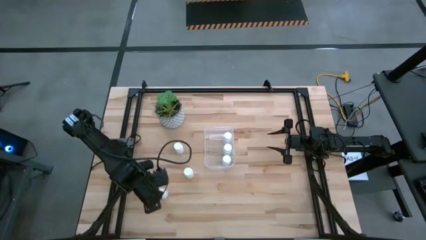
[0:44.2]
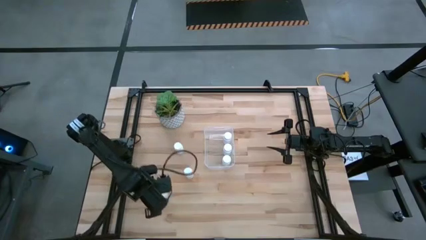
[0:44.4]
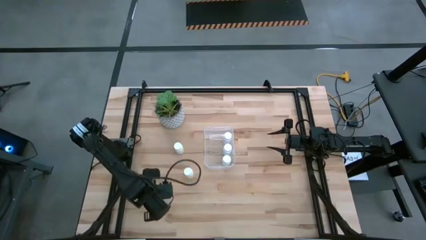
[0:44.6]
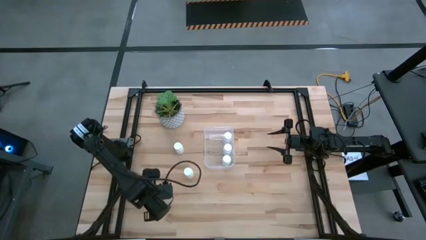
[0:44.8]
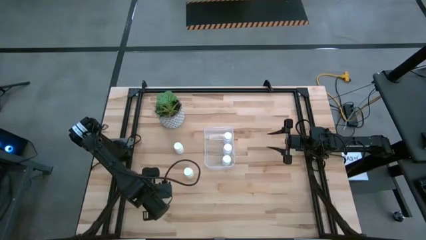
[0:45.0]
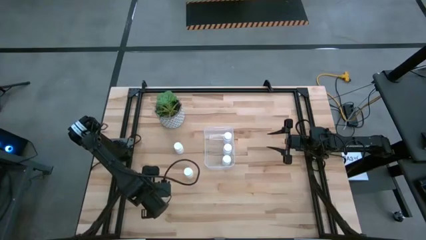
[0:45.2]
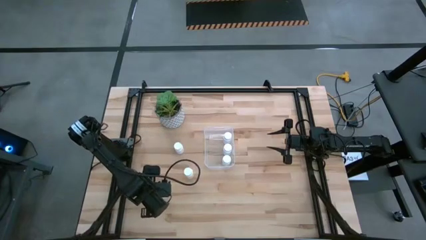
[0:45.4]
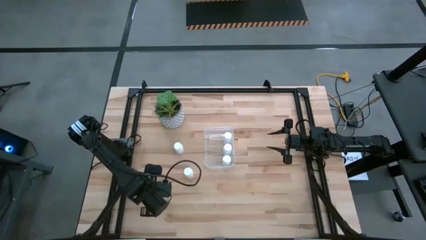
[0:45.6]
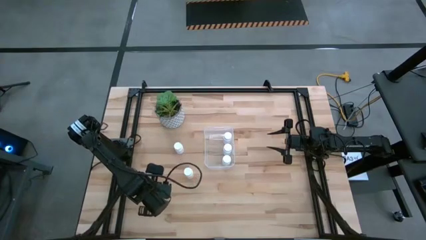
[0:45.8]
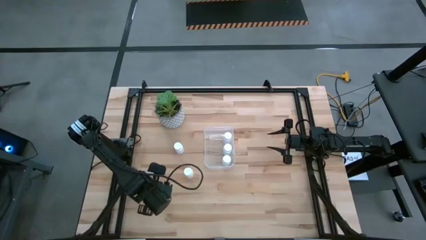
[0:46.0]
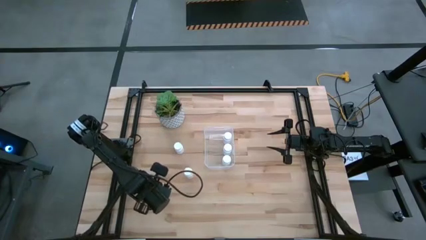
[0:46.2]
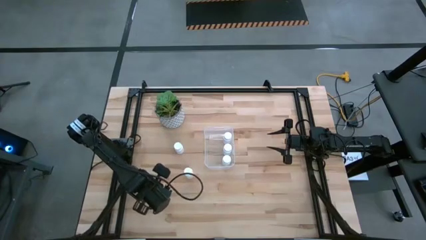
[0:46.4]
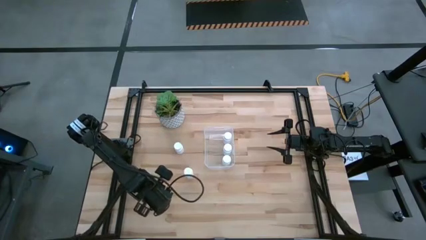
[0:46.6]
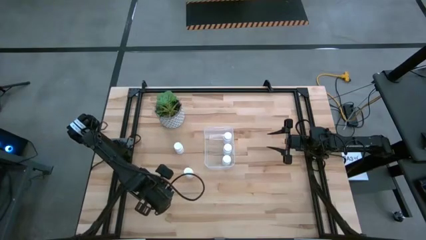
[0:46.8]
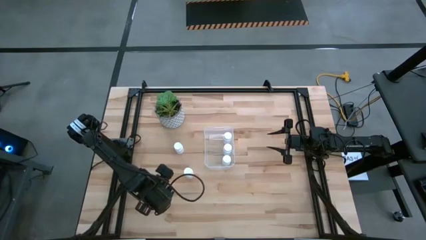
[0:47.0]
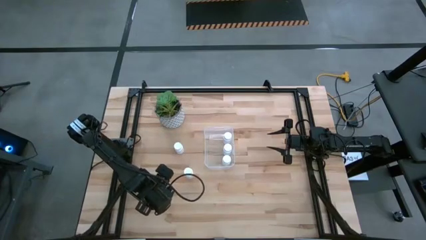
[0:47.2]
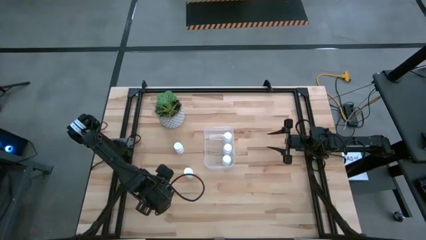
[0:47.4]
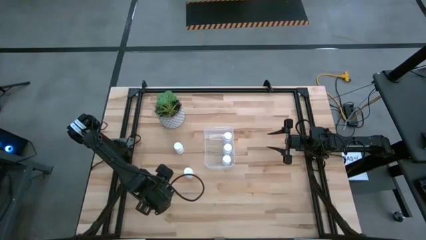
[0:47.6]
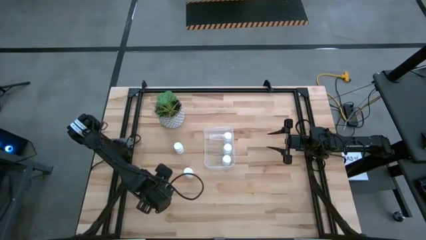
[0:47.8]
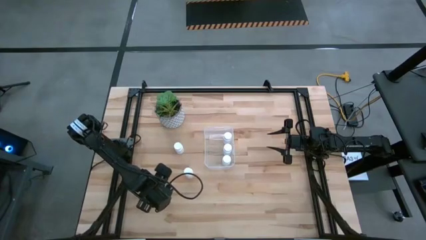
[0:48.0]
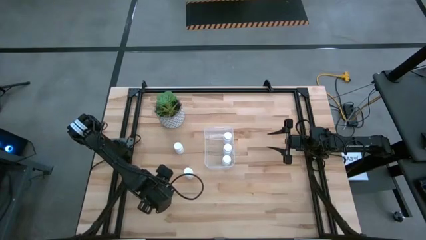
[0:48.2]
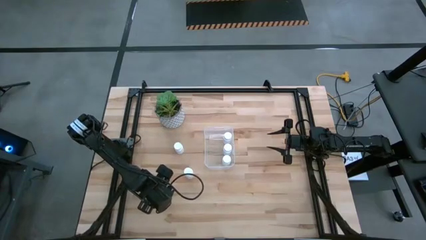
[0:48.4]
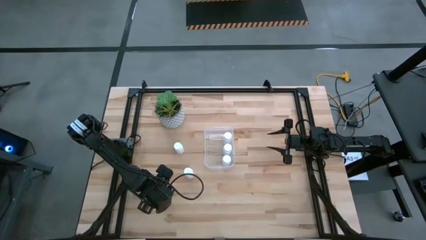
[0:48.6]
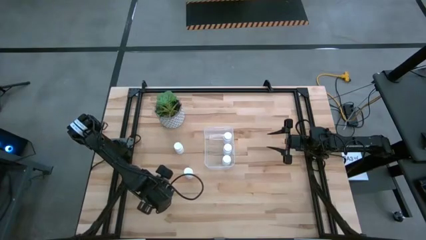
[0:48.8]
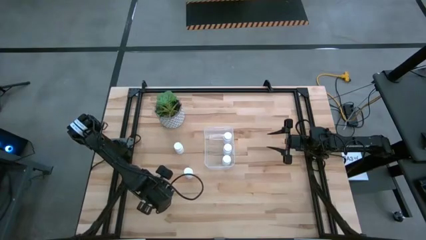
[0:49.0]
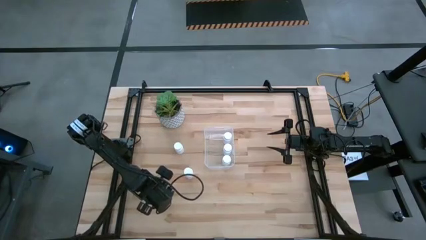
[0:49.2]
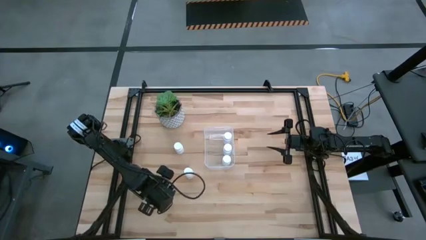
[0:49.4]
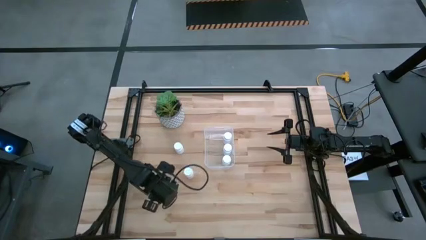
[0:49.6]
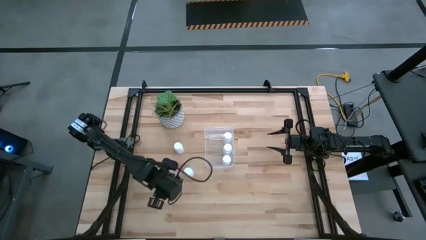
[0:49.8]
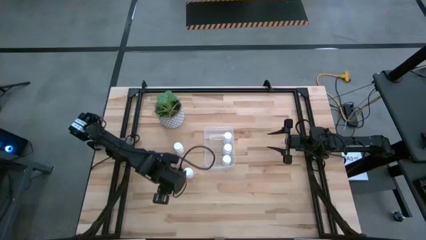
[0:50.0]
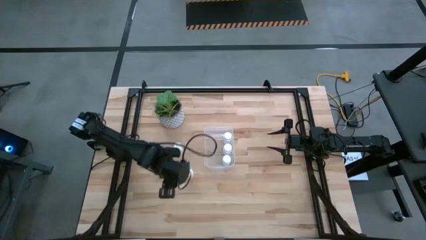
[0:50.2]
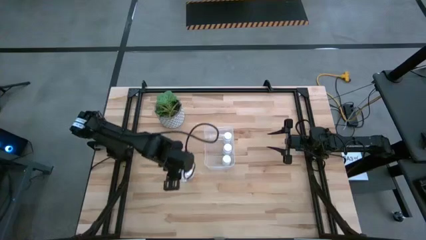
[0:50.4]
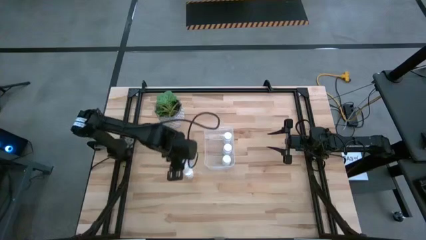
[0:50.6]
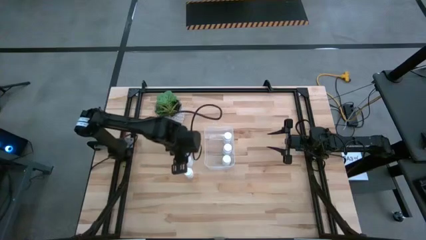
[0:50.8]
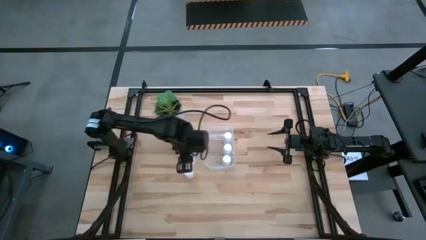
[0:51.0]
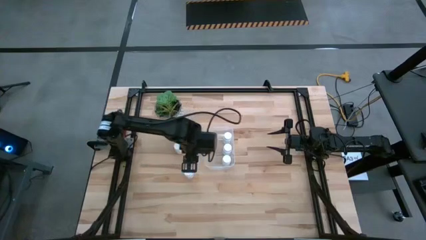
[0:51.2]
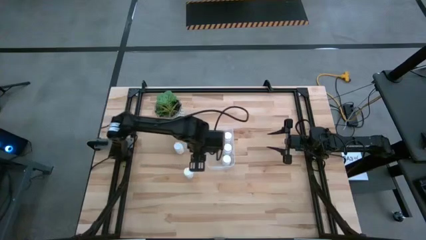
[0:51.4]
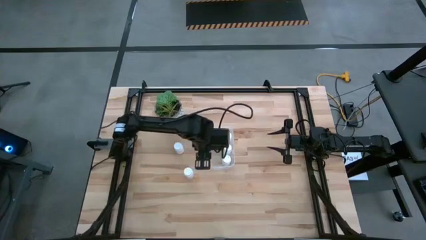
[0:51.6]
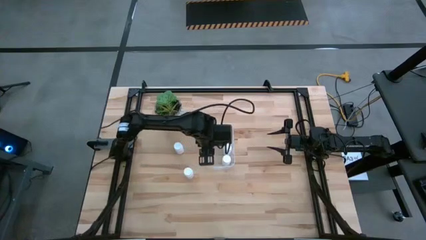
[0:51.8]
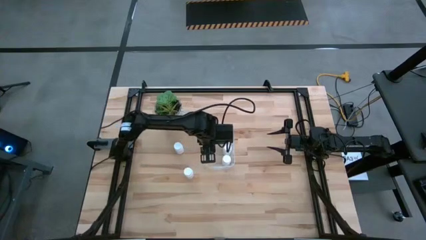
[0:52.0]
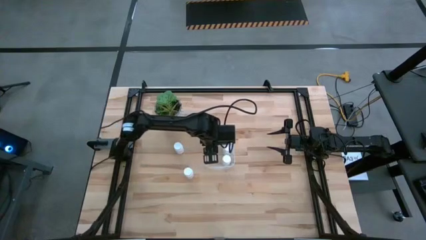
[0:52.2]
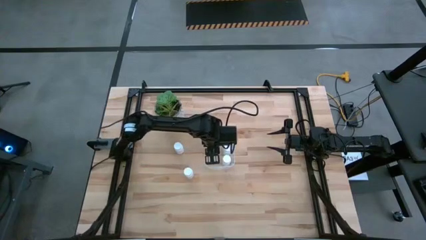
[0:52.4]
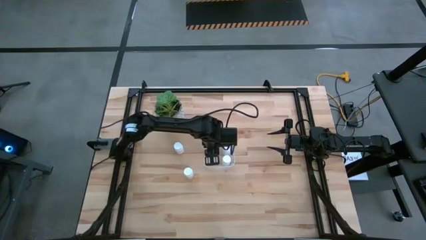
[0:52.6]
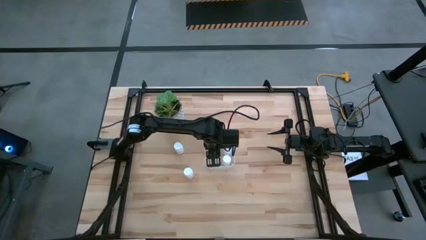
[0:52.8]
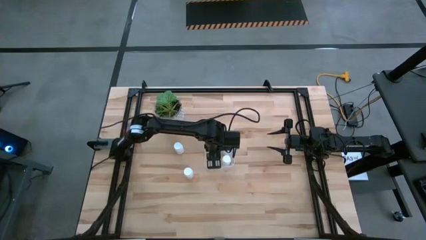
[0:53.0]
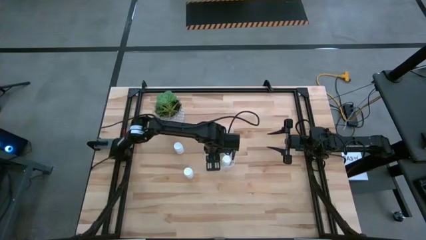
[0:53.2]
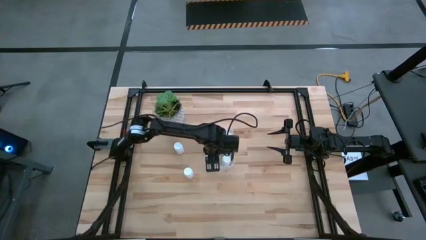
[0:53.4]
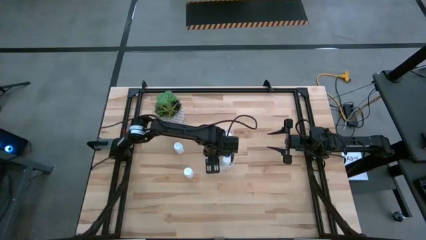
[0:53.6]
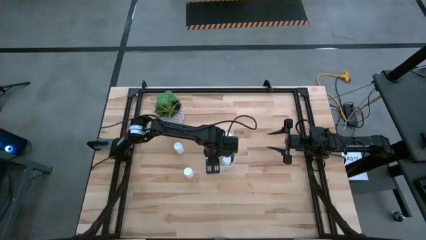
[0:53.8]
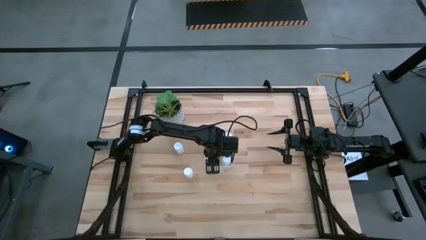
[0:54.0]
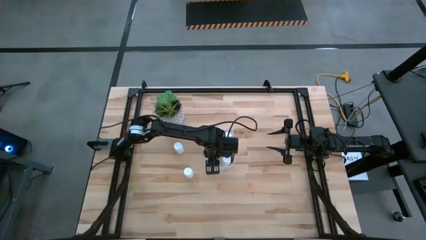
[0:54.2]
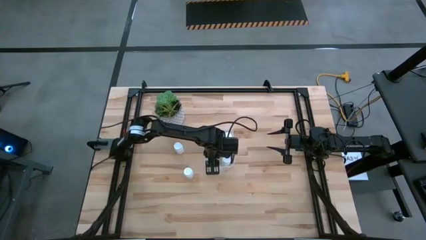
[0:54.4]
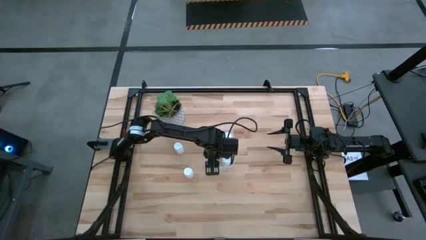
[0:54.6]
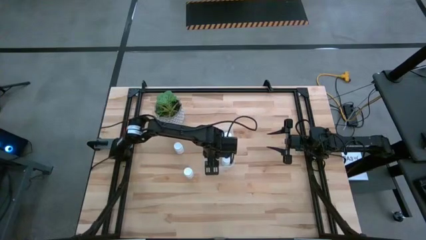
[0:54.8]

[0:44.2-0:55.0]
Task: Pick and place pill bottles into a basket
Put the white pill bottle into the transparent container

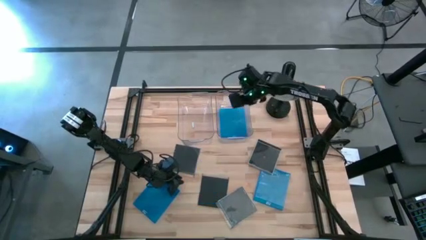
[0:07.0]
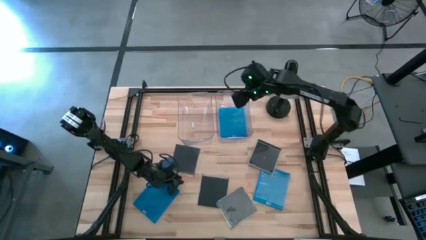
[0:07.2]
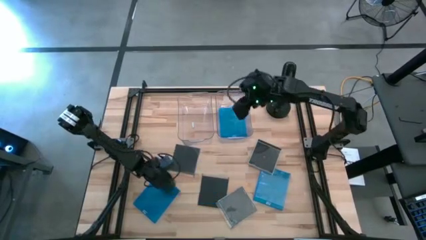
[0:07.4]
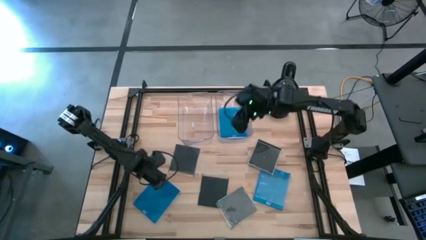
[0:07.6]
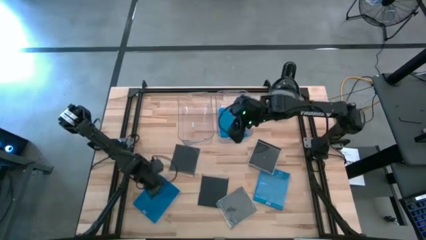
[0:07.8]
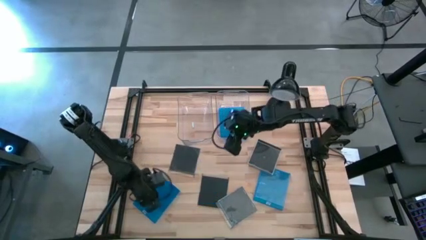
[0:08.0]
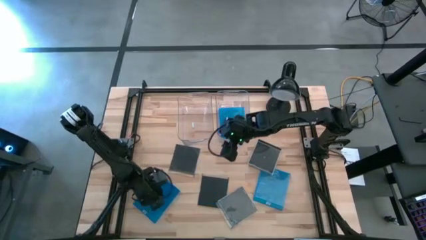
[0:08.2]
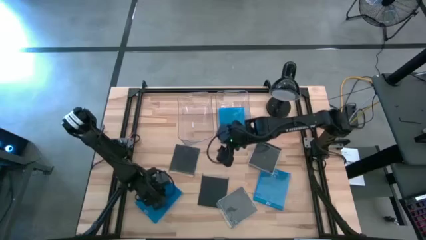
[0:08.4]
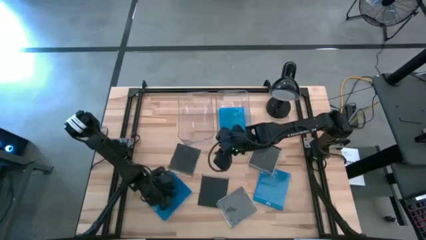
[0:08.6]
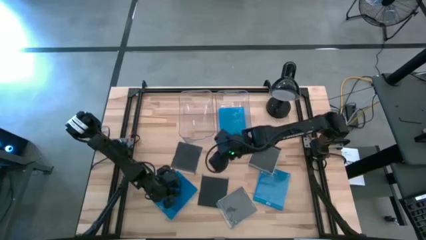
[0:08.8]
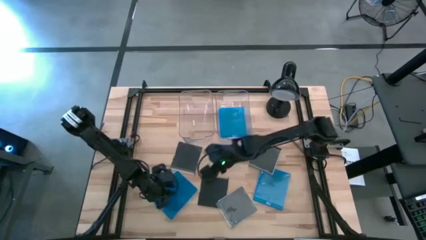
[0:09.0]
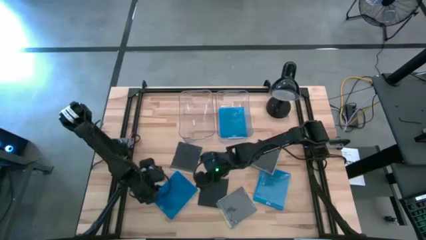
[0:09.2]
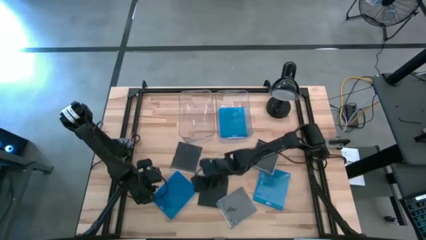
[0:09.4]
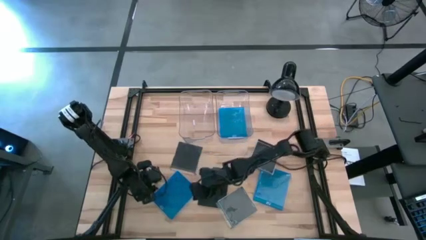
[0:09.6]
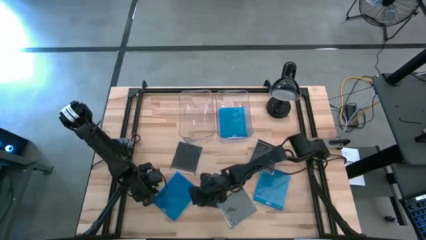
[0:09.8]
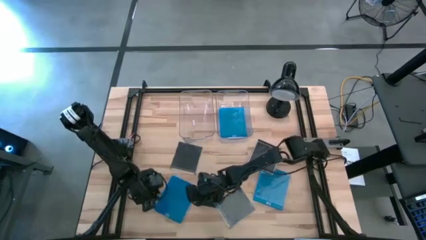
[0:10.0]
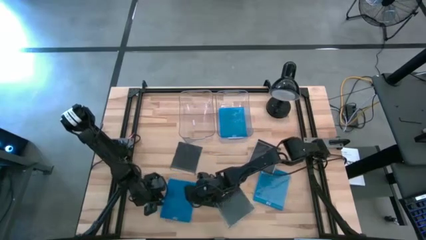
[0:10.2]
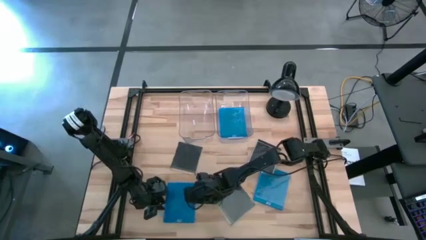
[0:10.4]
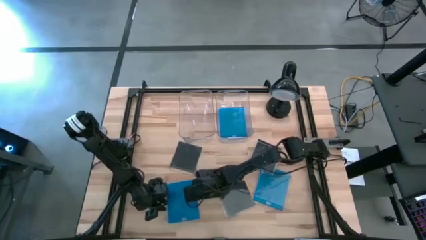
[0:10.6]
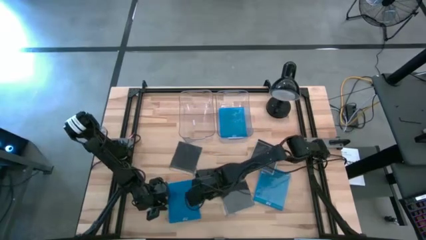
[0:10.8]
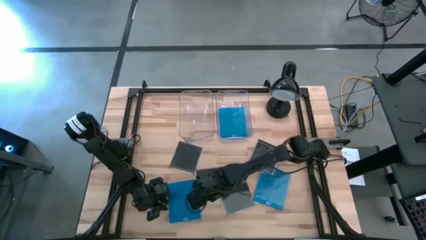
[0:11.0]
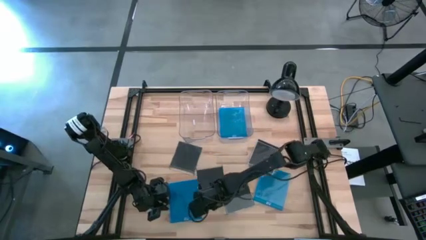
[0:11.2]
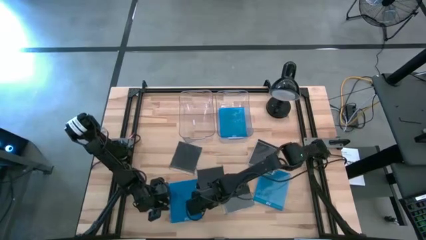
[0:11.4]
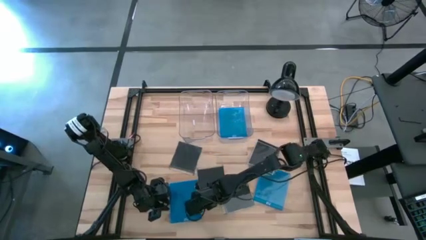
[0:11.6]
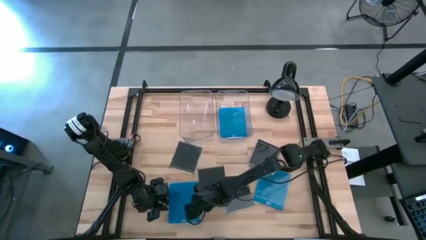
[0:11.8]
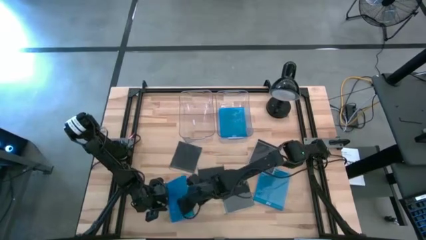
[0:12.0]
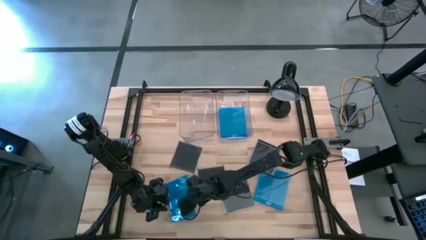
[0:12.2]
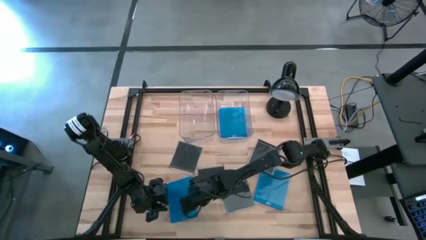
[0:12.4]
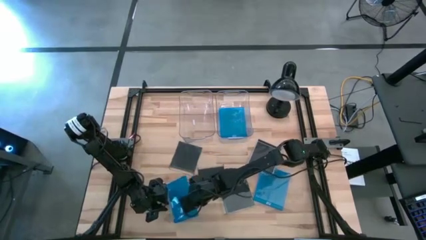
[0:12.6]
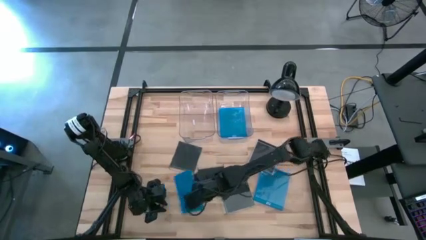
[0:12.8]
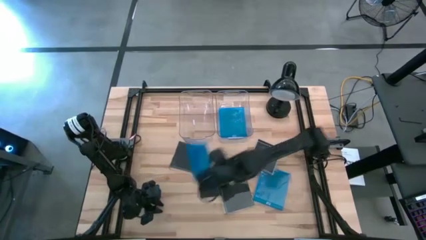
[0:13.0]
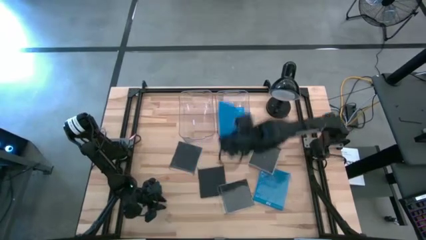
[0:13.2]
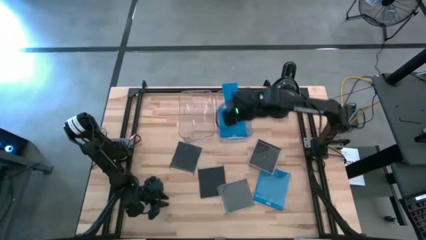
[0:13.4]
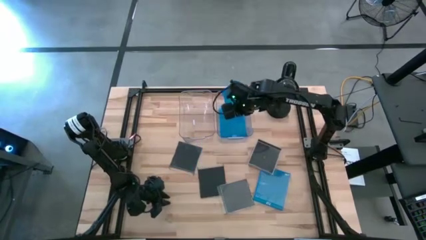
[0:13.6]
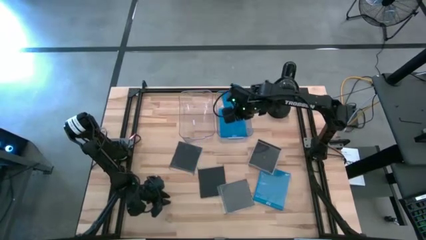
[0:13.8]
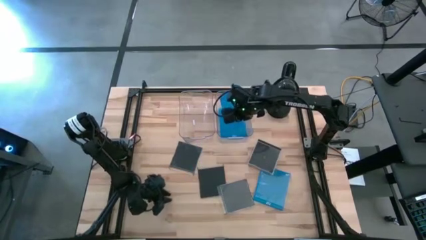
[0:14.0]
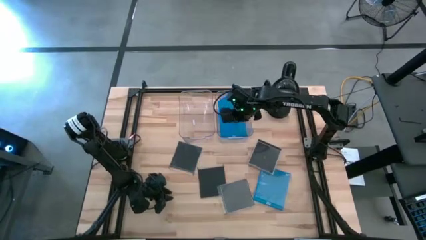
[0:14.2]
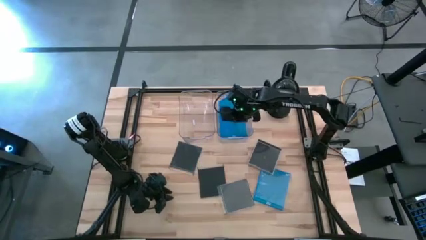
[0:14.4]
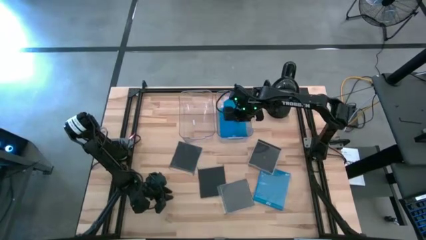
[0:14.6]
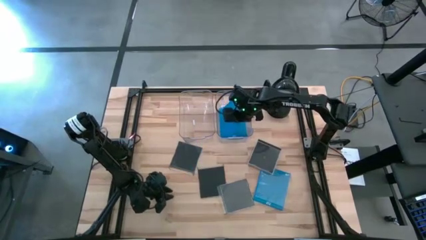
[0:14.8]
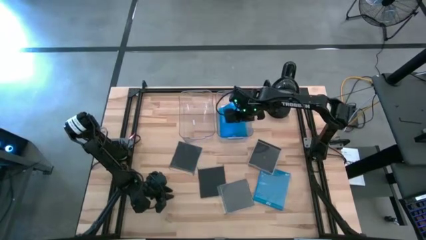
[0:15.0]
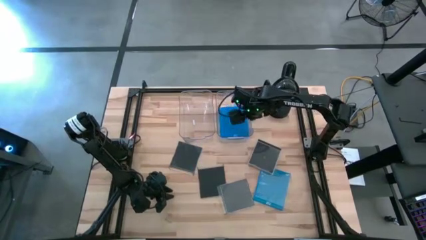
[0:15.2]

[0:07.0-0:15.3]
Task: Pick & place jewel cases by type
Put the left blue CD case into the right transparent bin
